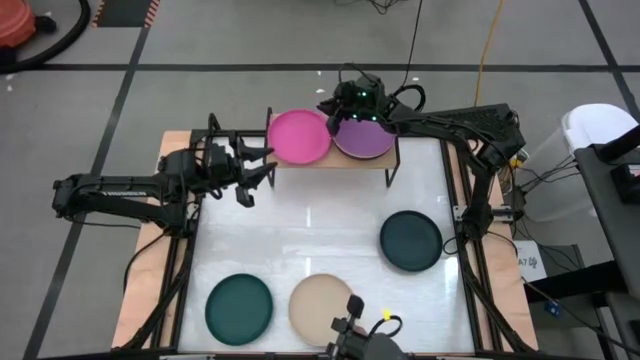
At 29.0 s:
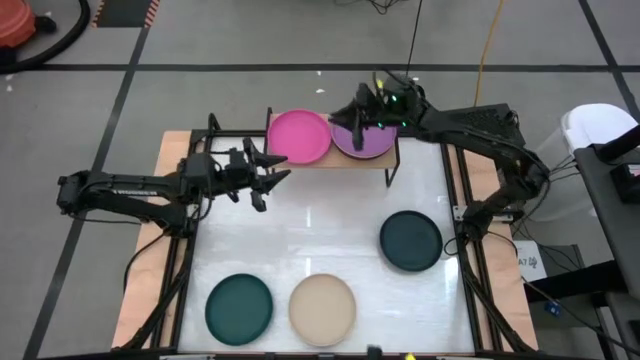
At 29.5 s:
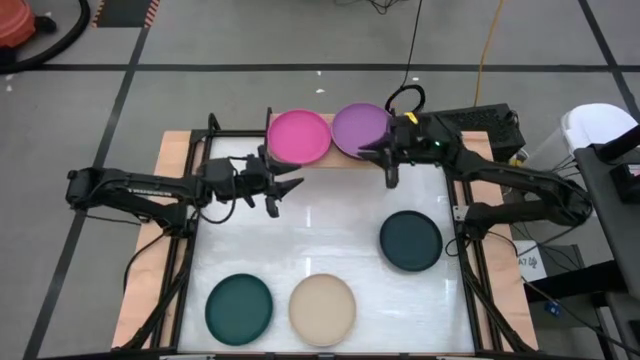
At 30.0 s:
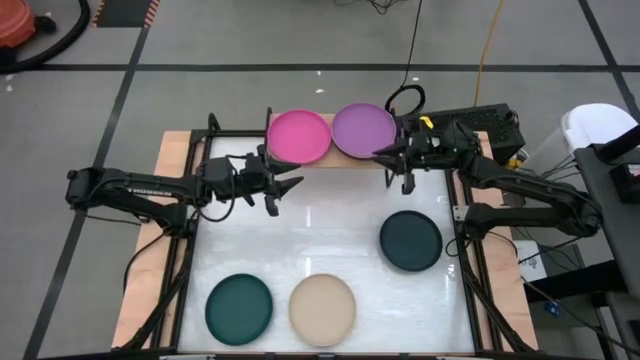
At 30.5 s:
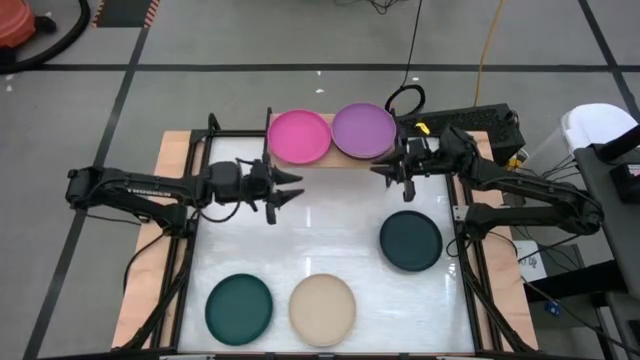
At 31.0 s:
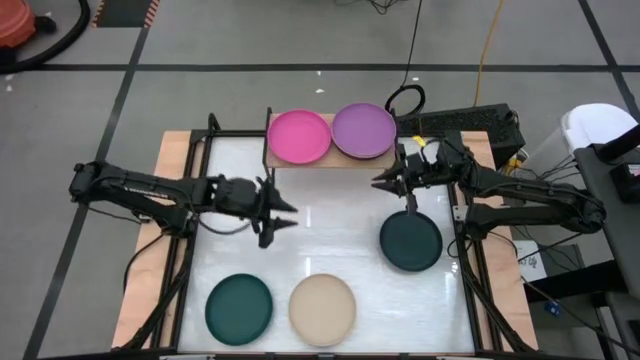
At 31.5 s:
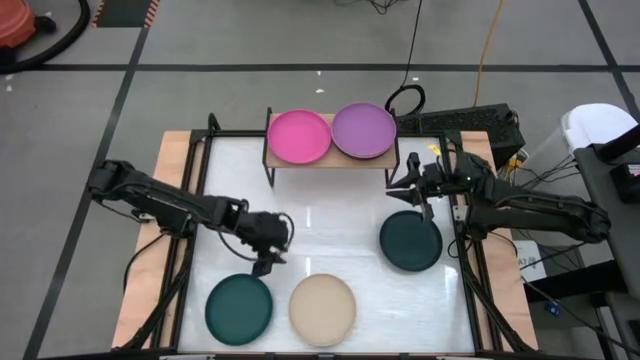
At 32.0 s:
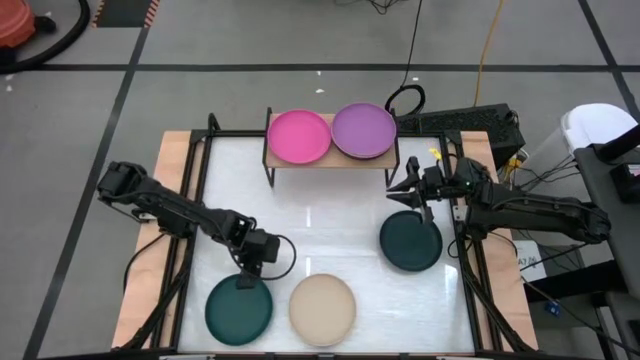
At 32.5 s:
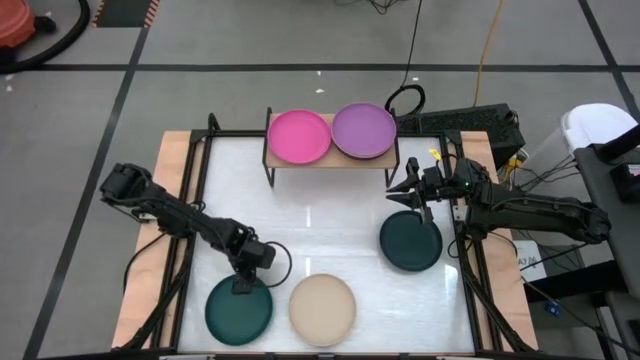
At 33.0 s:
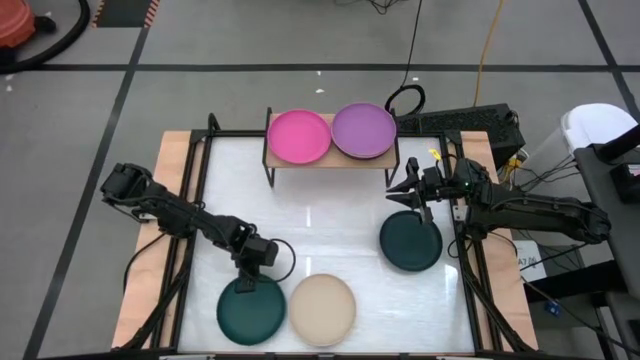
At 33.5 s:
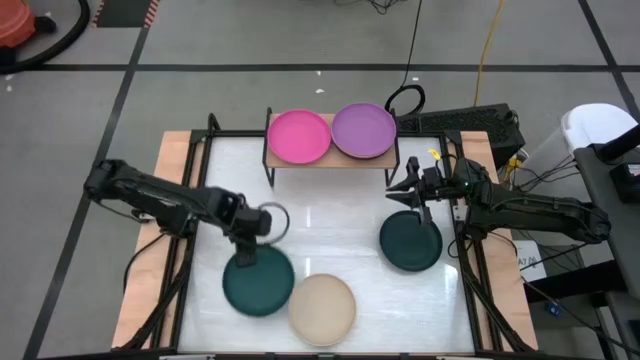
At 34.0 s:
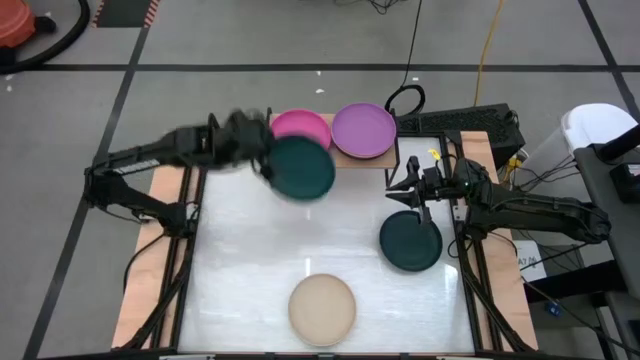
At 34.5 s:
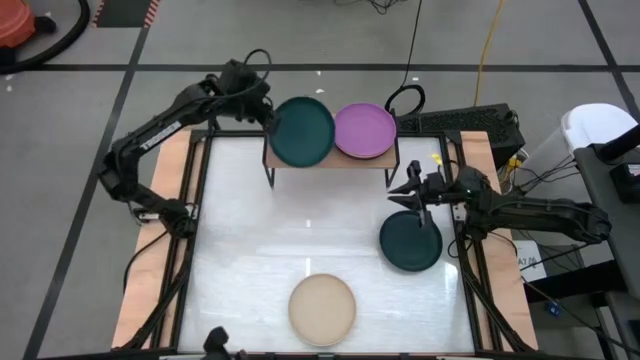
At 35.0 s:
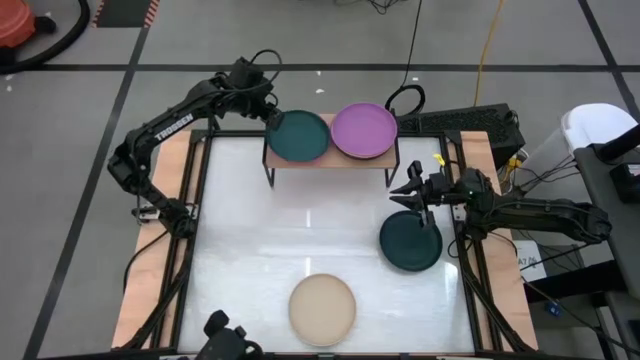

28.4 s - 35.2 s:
Task: Place and stack plates onto a shelf
Stack the left dark green plate on top of the pink plate on the shelf

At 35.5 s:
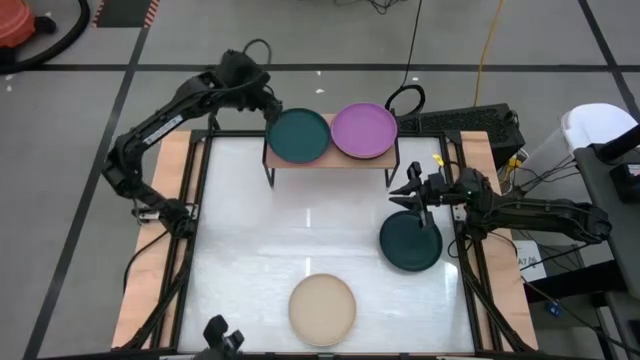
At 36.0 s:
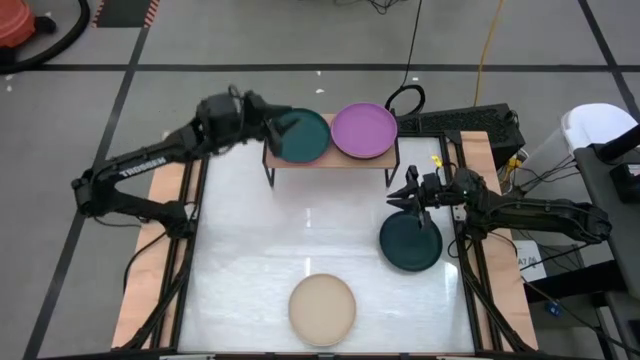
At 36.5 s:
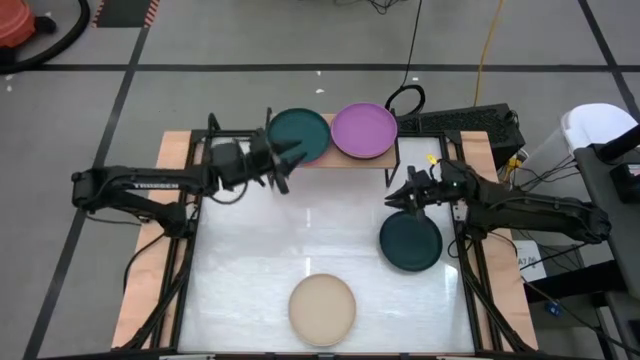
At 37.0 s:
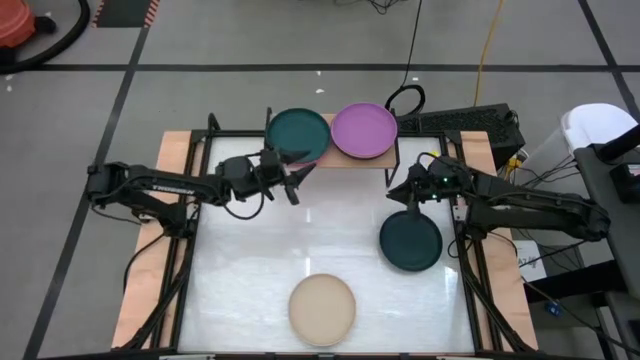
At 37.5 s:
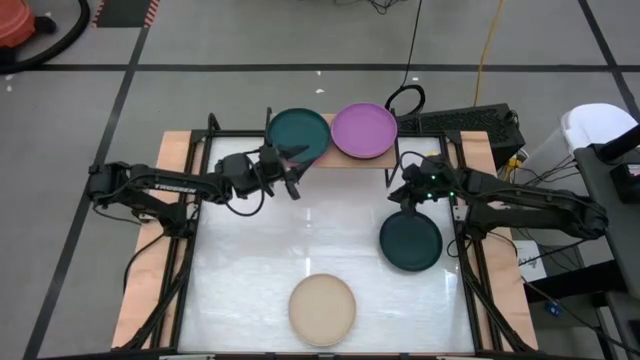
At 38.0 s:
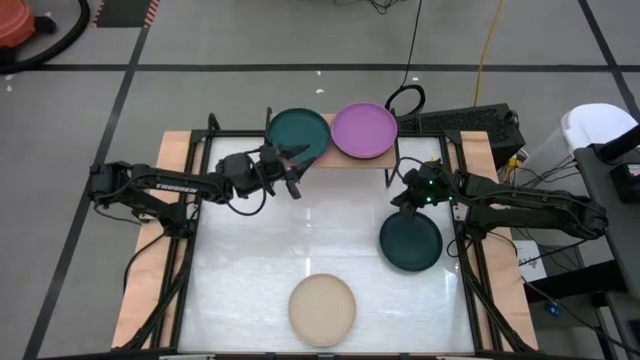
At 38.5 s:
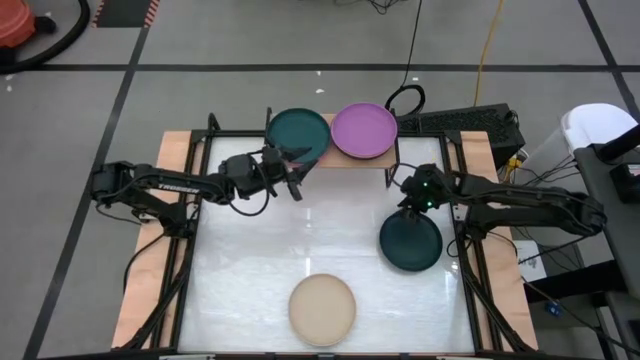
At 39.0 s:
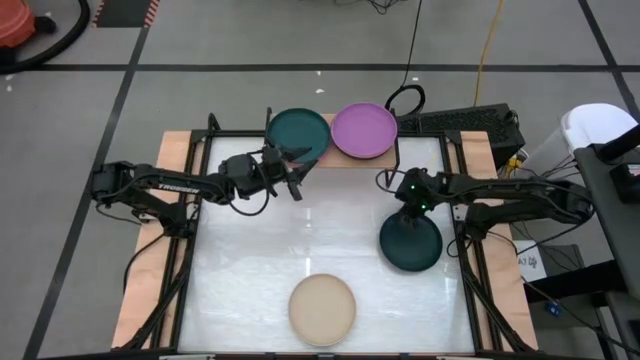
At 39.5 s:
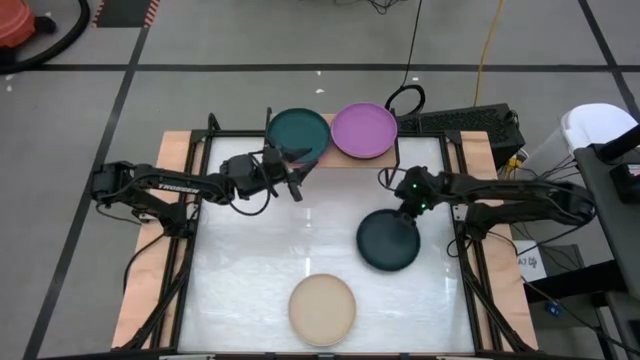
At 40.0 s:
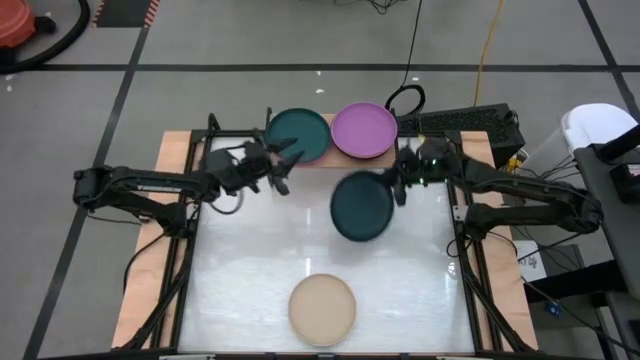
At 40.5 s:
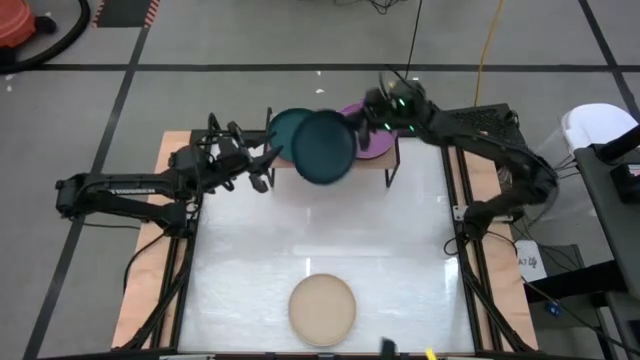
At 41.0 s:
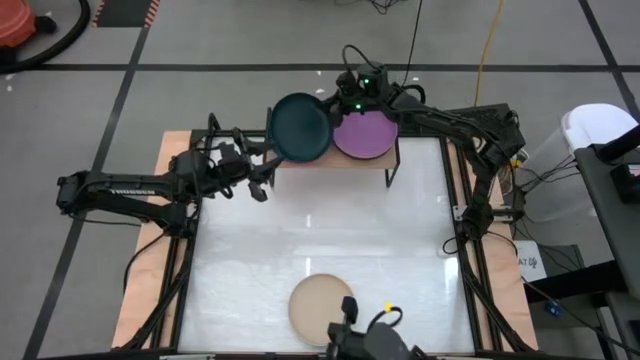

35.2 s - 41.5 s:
Stack the dark green plate on top of the dark green plate on the shelf

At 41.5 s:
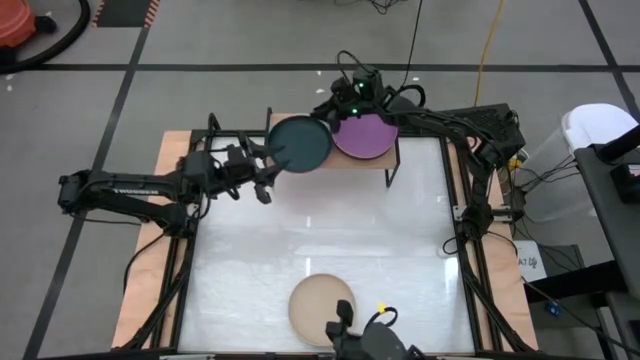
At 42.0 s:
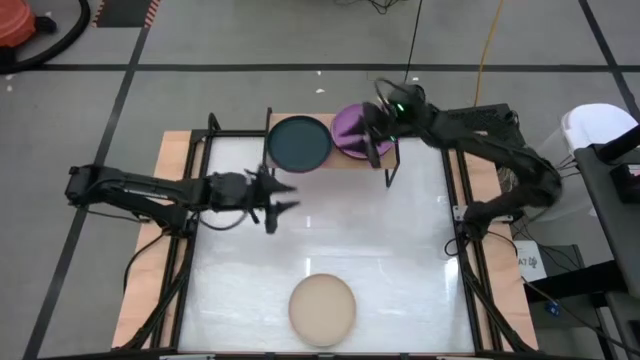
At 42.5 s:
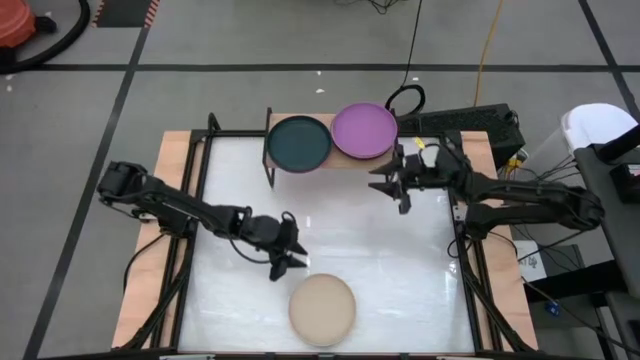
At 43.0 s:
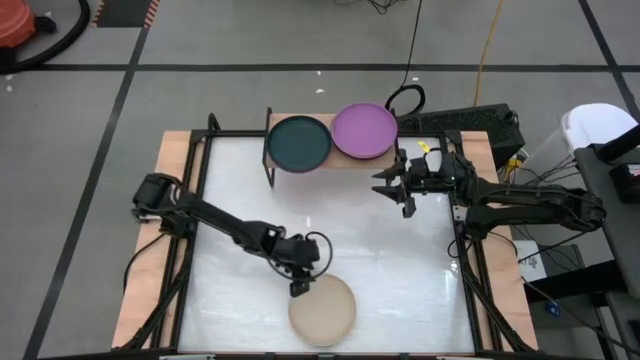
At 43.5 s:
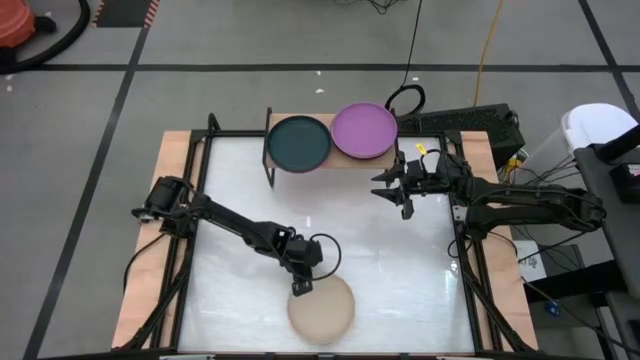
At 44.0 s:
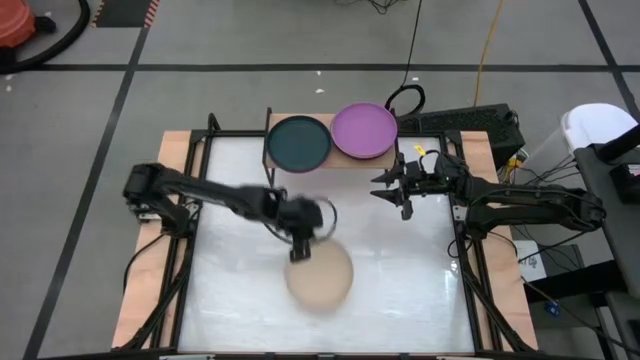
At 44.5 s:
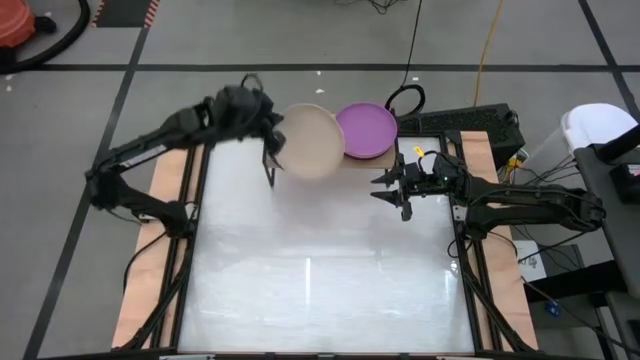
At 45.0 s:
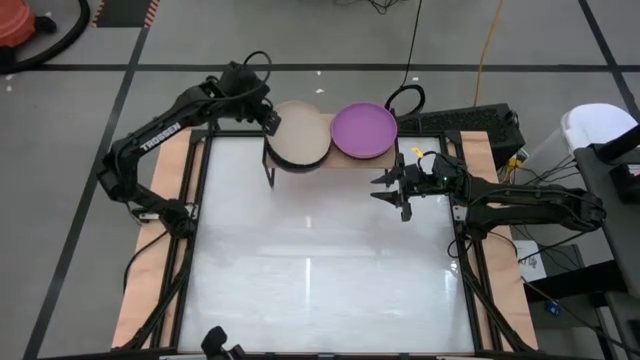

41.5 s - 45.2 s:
Stack the brown plate on top of the black plate on the shelf

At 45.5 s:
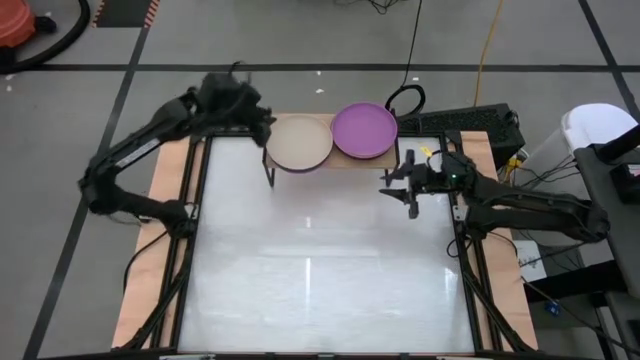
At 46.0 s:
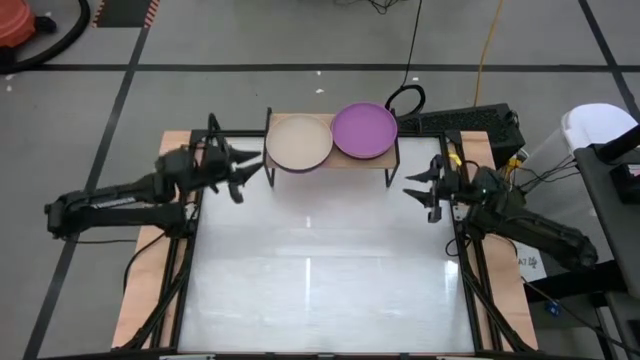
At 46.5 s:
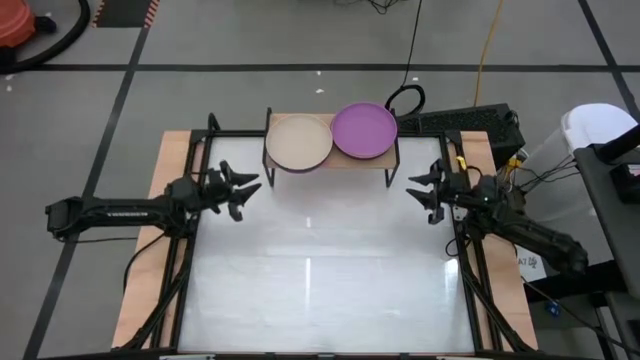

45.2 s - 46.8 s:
Return to Home Position

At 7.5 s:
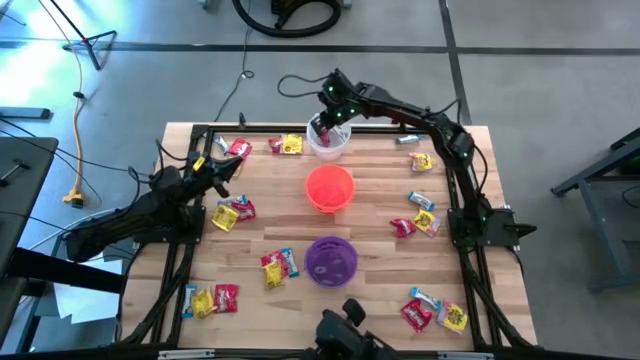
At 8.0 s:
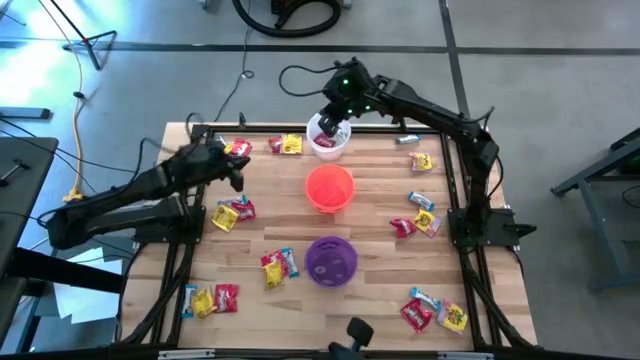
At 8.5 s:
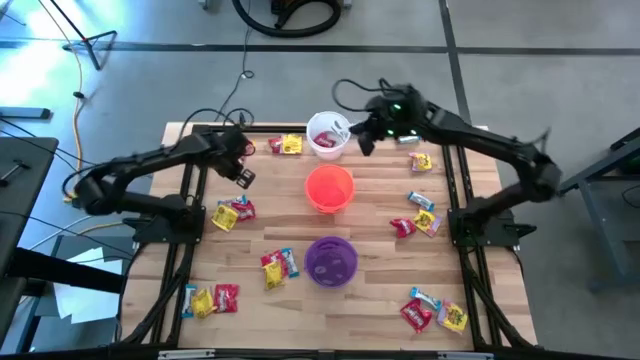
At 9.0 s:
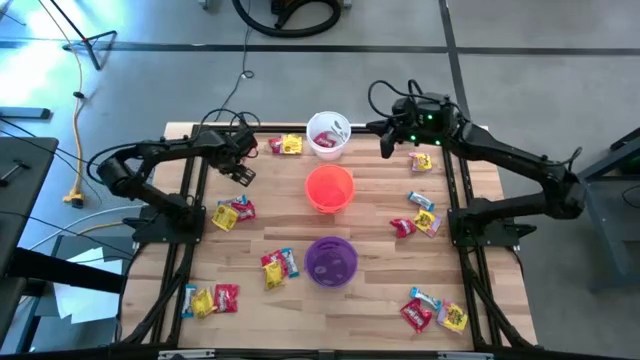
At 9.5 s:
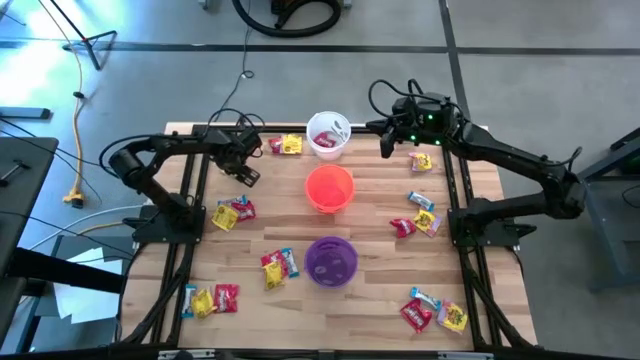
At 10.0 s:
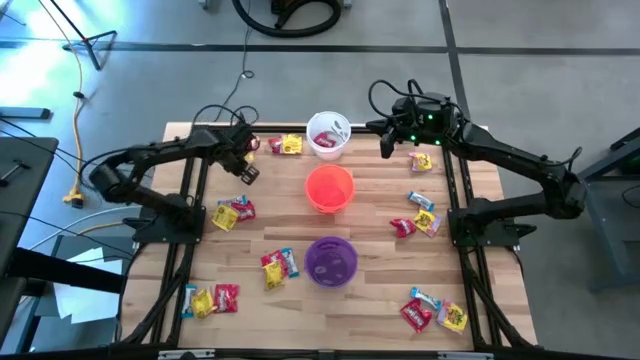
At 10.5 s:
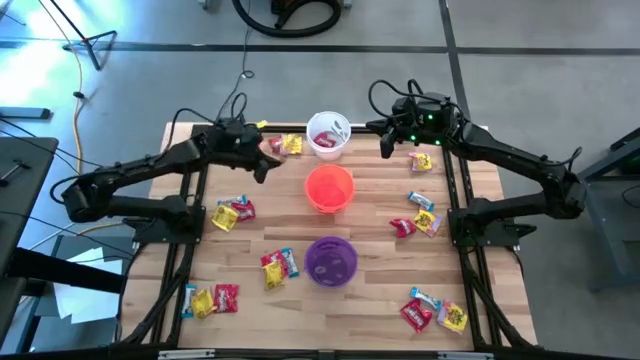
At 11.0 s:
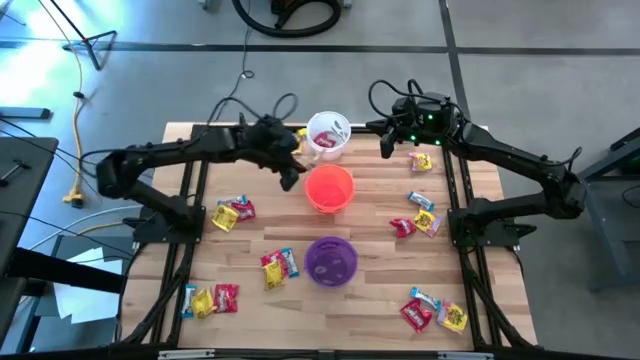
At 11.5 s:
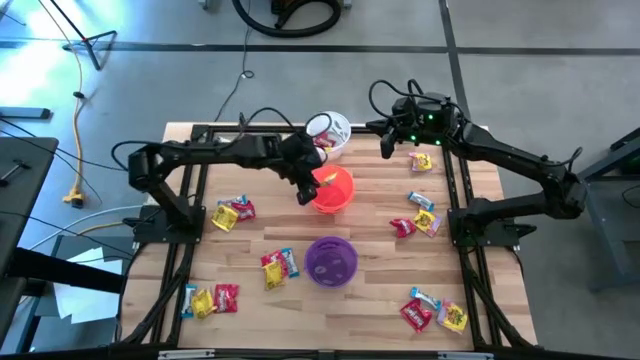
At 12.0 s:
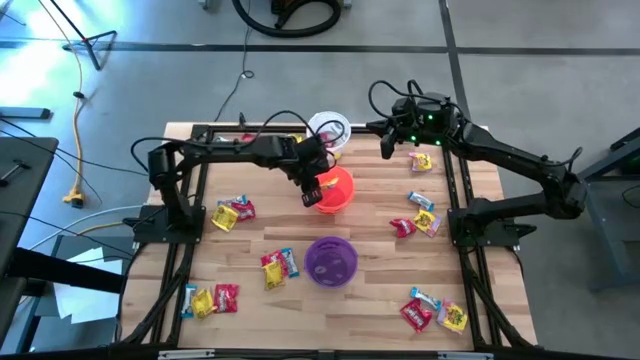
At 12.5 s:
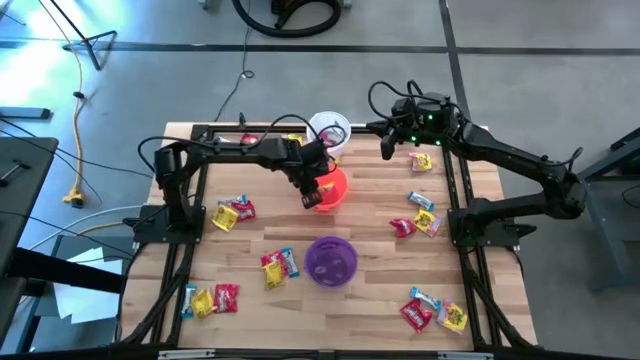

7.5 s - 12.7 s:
Task: Sort candy
Put the yellow candy into the orange bucket
